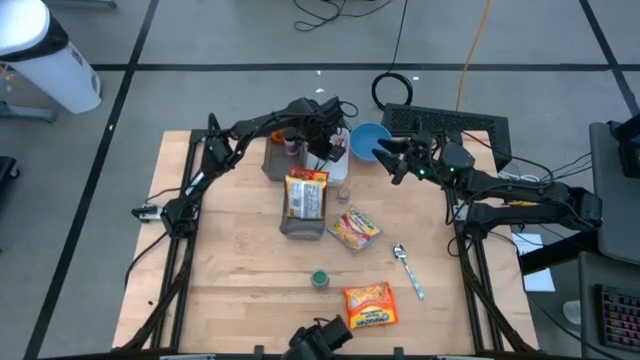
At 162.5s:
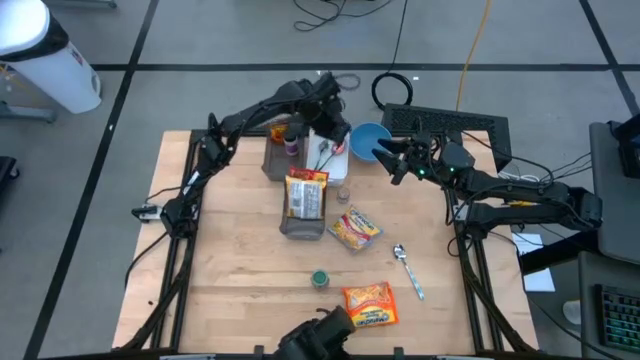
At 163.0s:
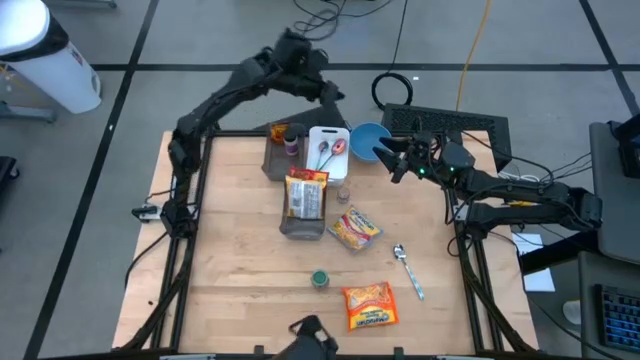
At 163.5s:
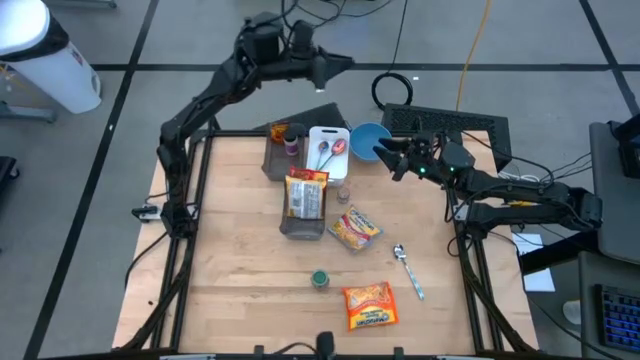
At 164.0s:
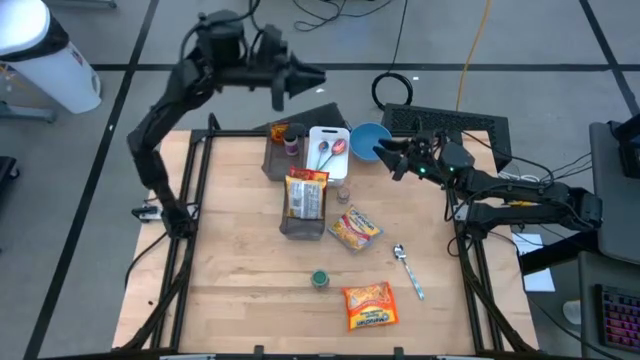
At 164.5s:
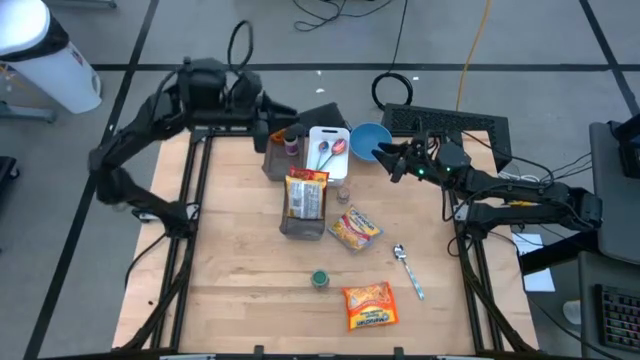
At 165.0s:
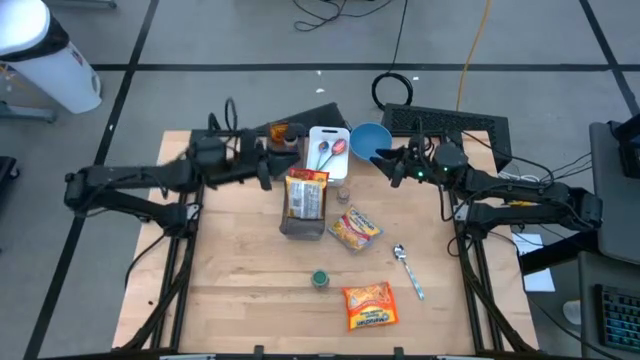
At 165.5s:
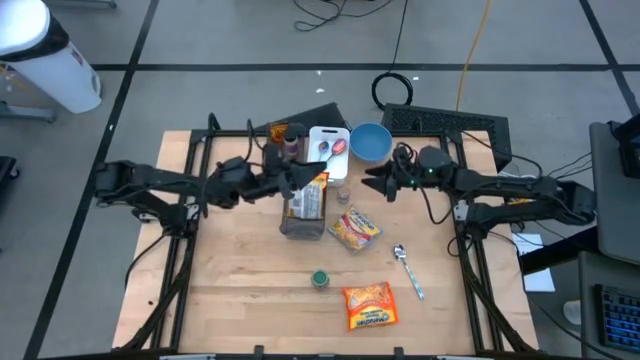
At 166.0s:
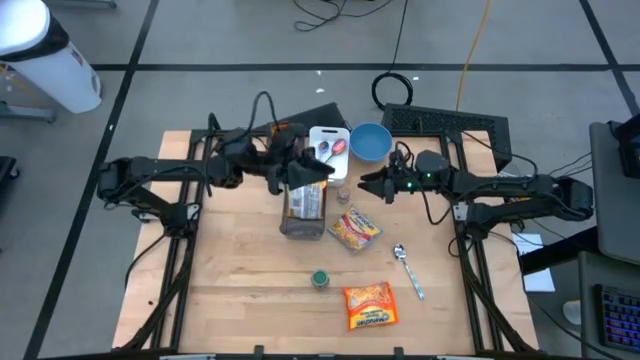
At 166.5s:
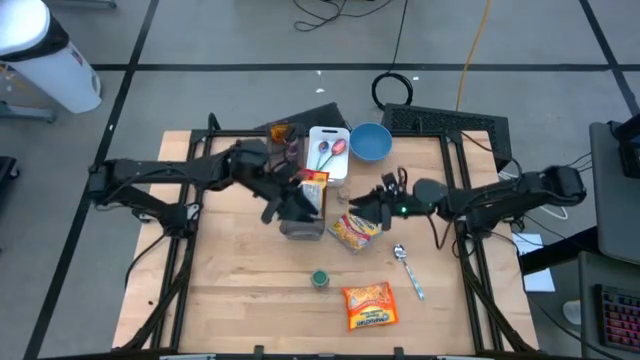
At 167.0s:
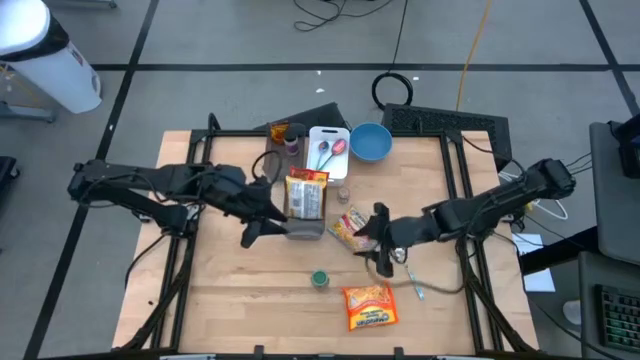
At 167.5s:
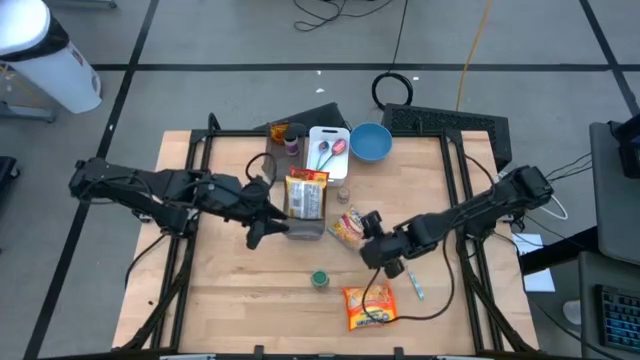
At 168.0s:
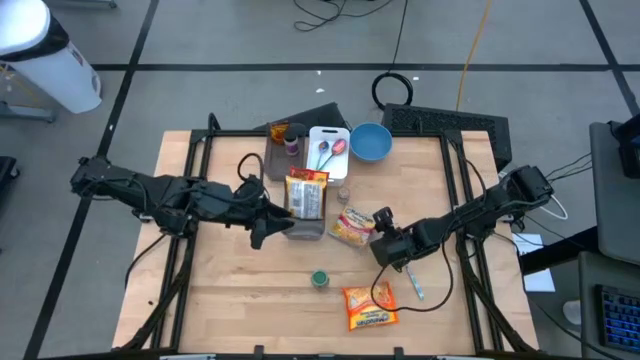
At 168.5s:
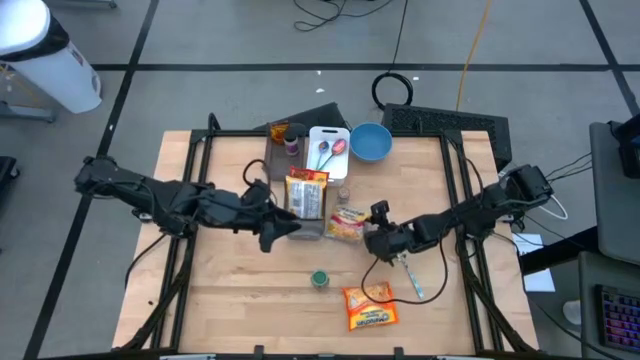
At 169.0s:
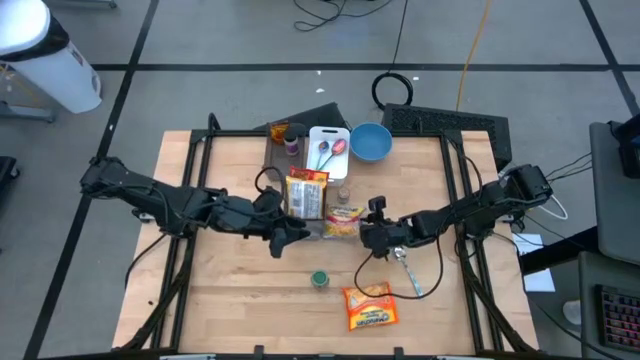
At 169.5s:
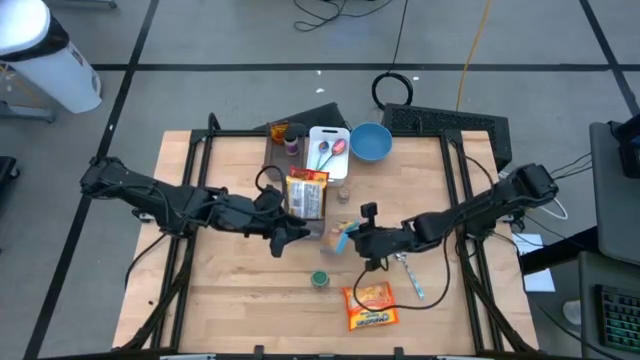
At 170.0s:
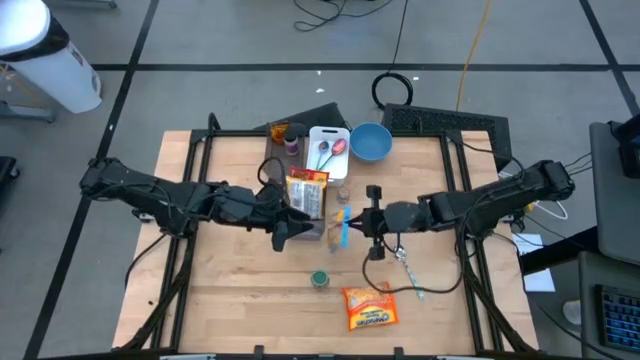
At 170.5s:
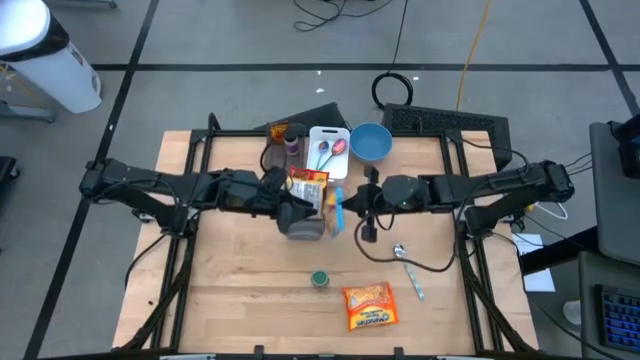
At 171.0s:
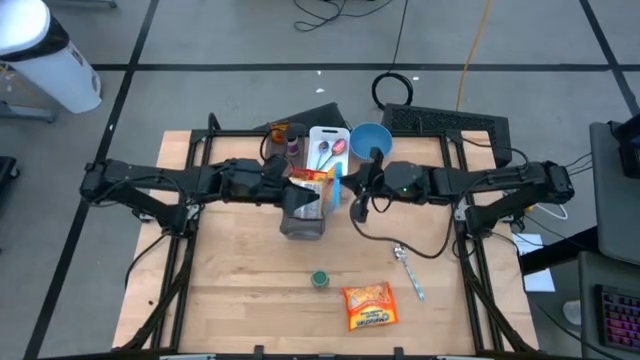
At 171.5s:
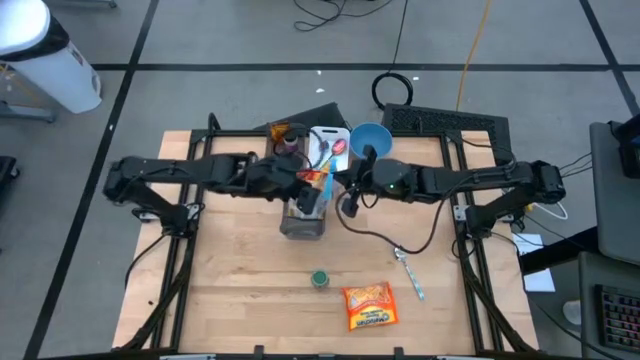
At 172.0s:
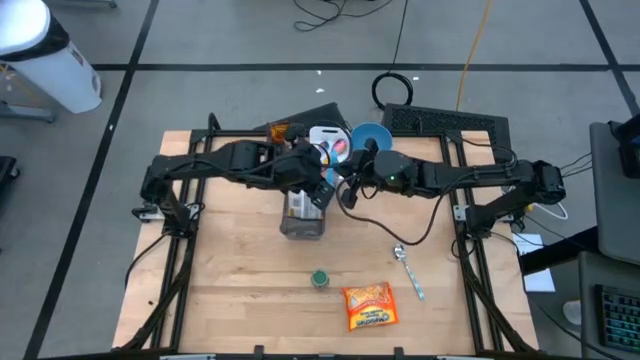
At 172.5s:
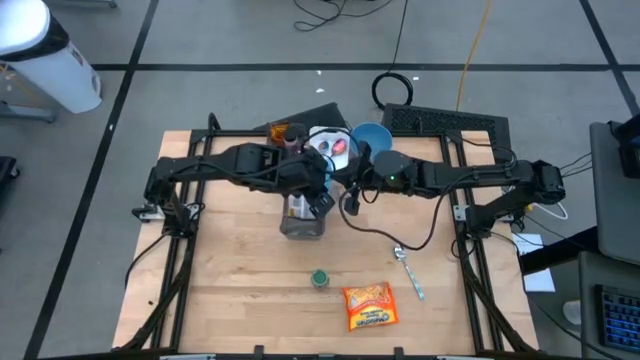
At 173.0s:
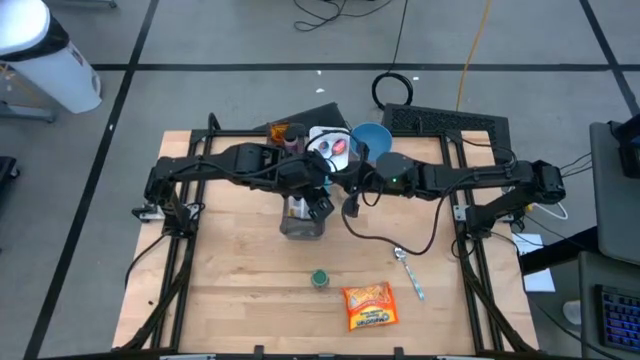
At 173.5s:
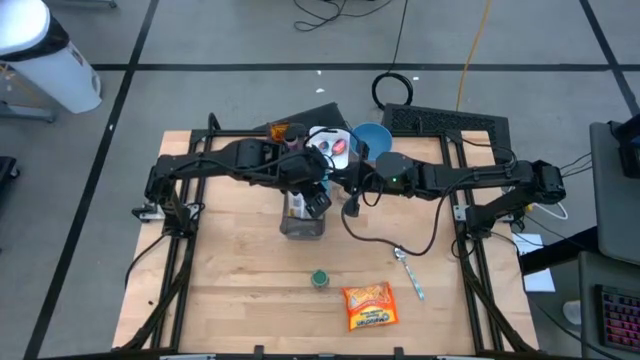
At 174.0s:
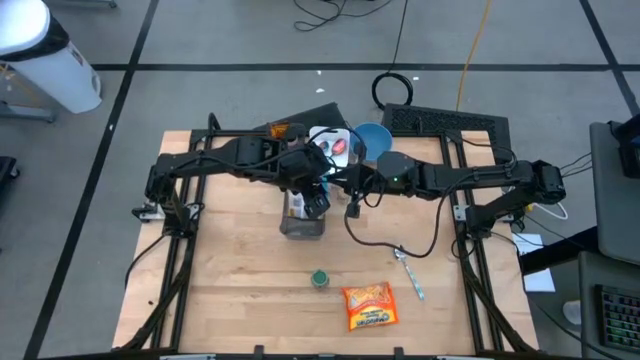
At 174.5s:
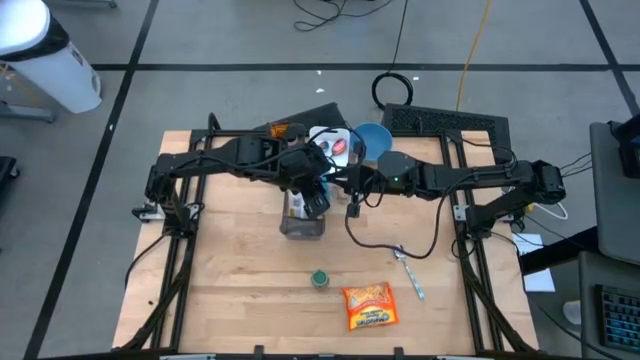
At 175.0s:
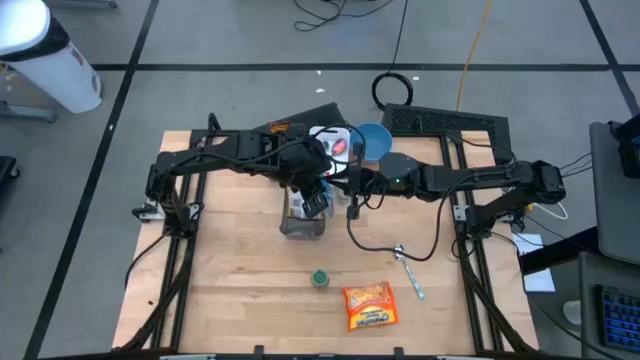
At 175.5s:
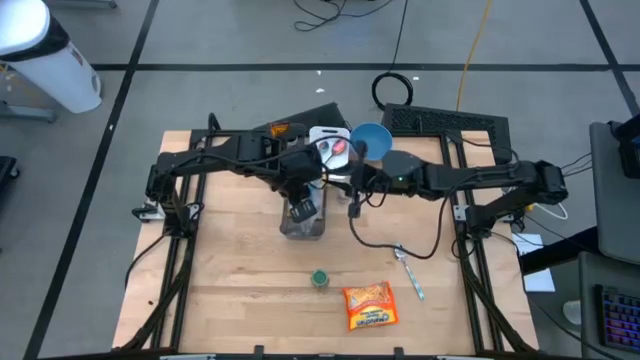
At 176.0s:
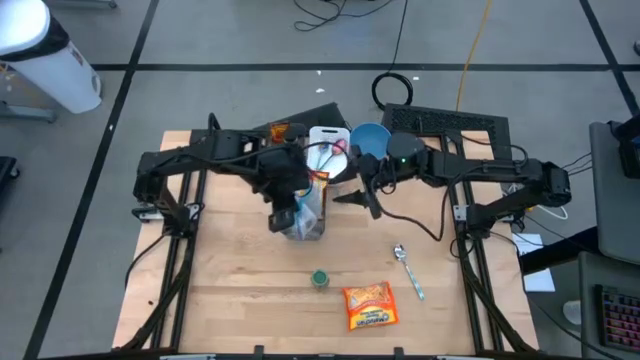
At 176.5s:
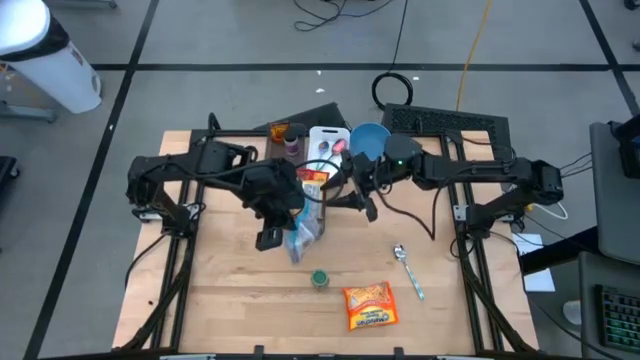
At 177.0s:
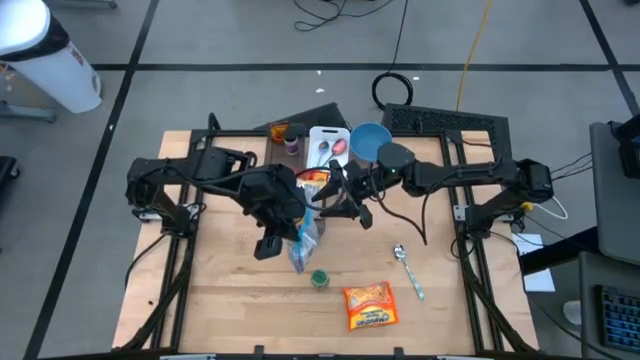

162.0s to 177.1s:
Task: Pick & Place Food Item
Put the blue noodle pack into the bottom black bin

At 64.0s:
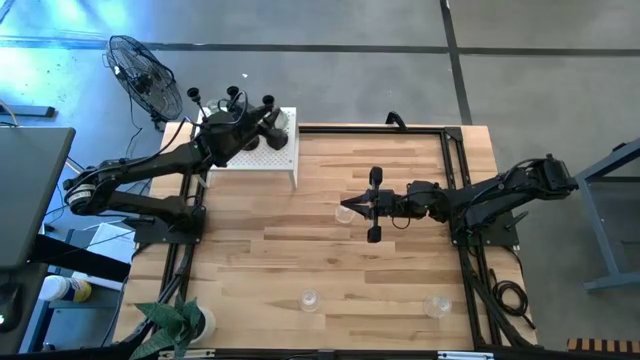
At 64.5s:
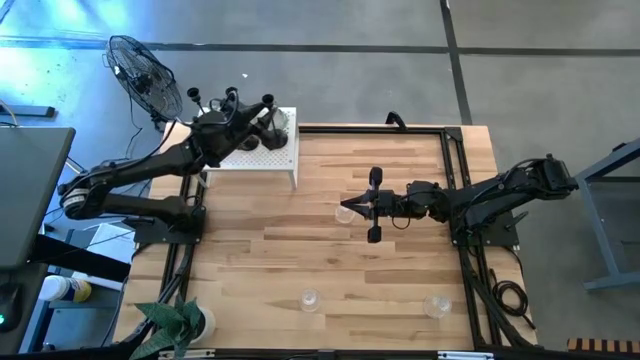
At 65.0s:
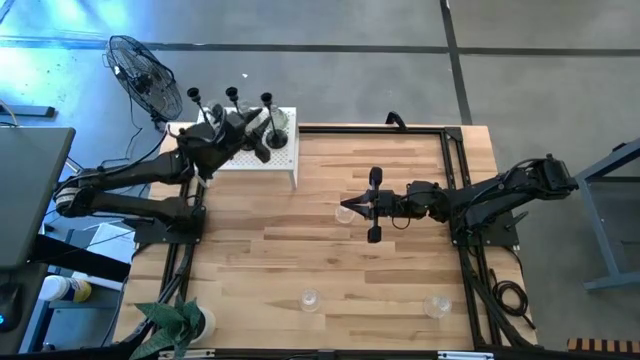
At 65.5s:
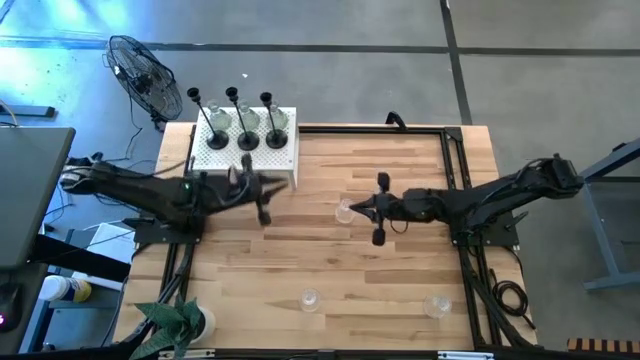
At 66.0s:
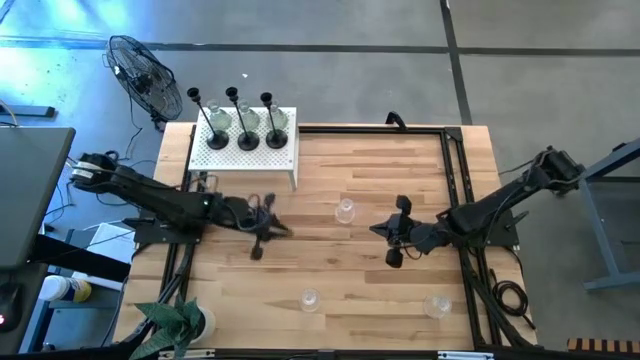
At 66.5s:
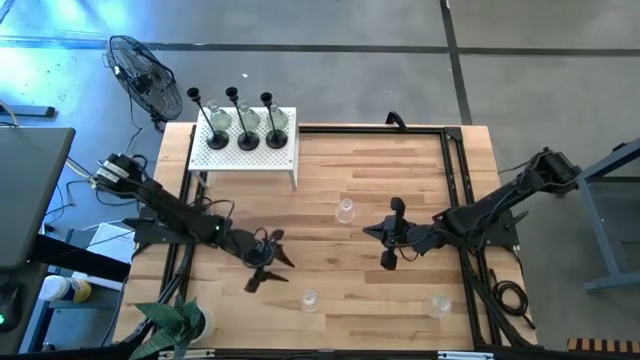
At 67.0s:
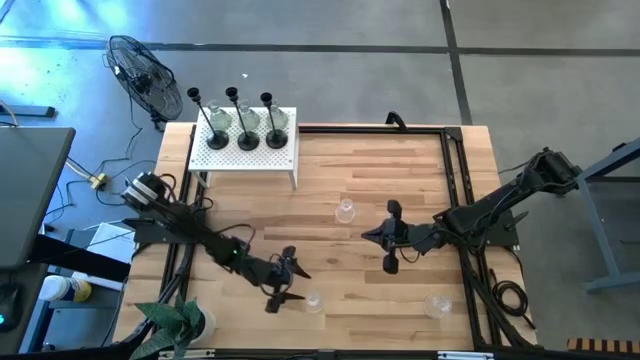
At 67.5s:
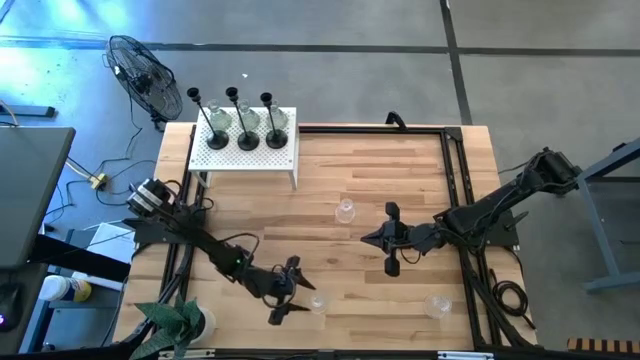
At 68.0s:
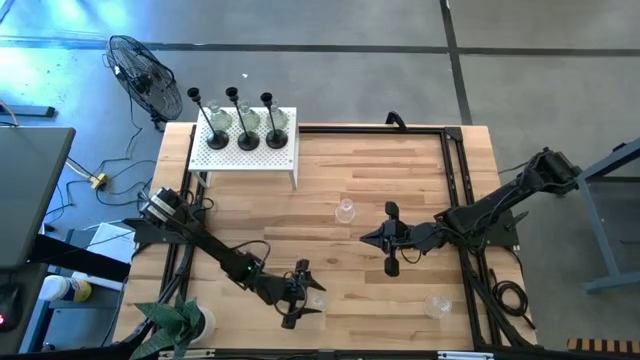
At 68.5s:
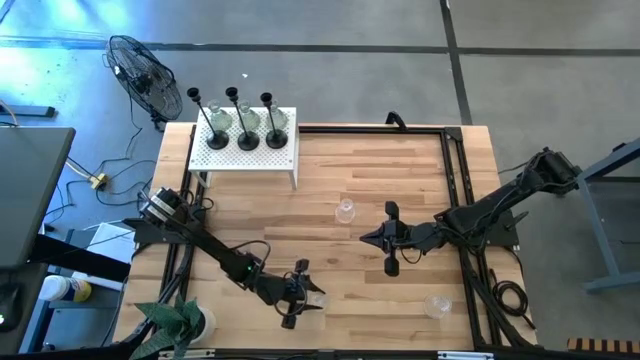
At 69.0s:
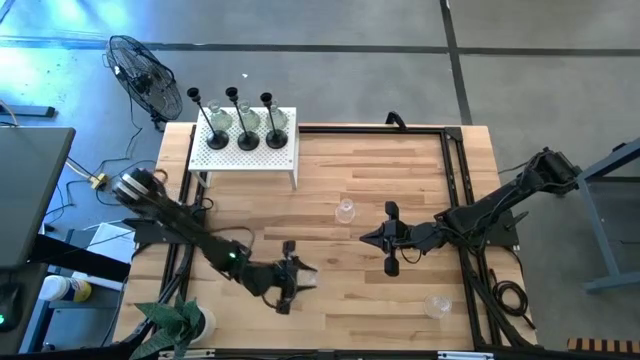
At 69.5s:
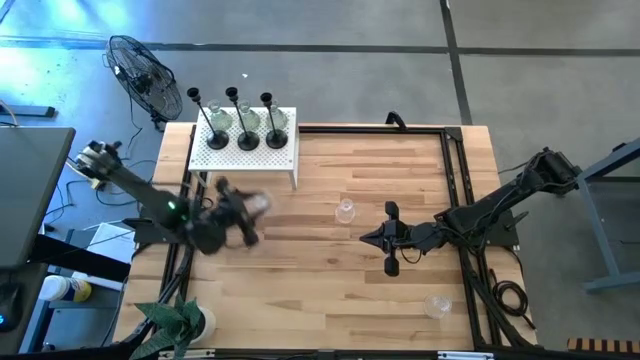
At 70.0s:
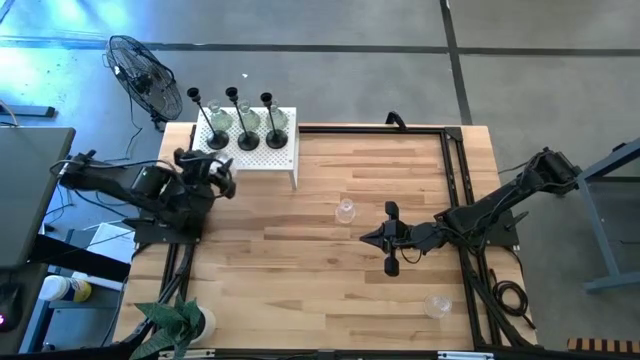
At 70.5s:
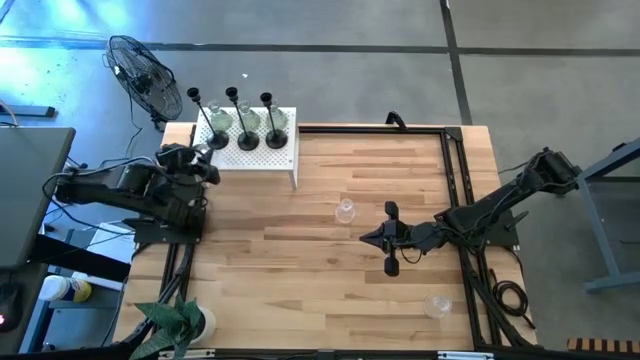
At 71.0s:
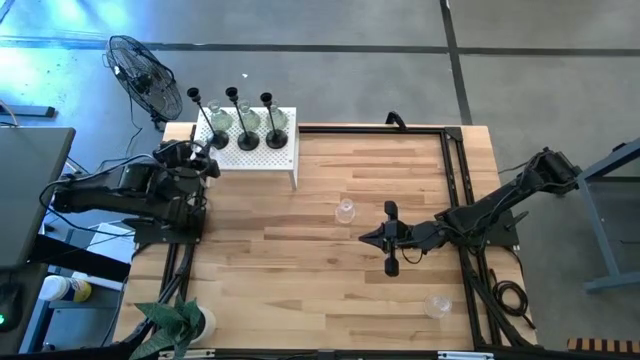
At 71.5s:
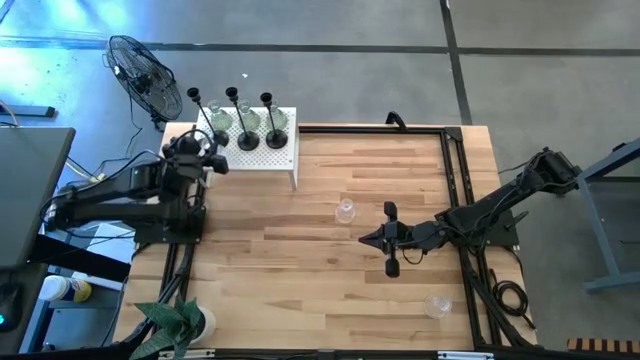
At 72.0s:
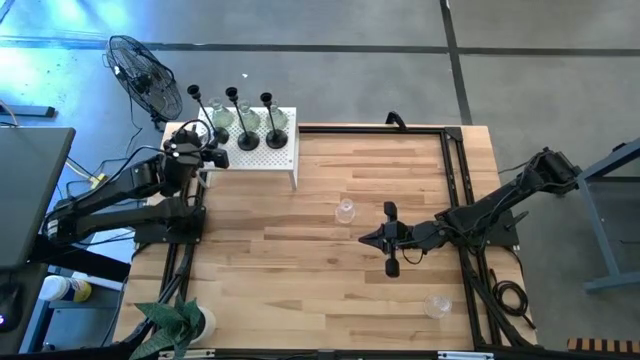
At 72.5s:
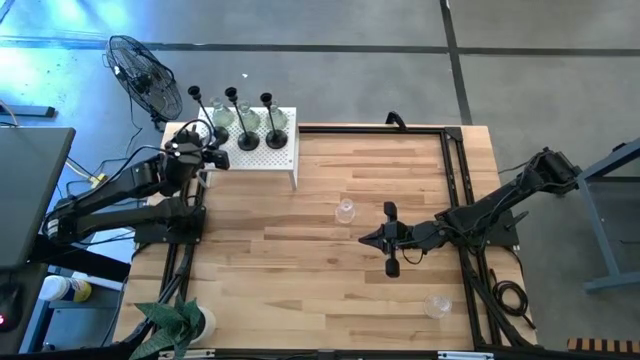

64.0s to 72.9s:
Task: Pick & Place candle stick holders
Put the bottom left transparent glass candle holder on the shelf
